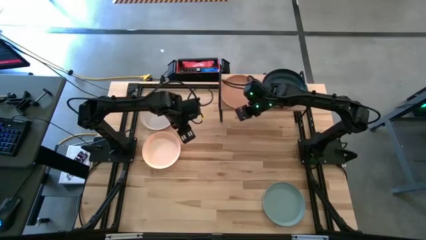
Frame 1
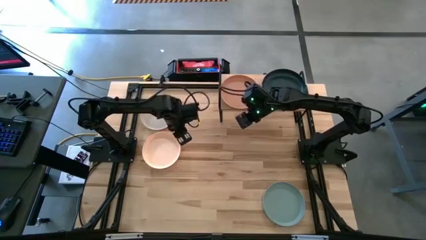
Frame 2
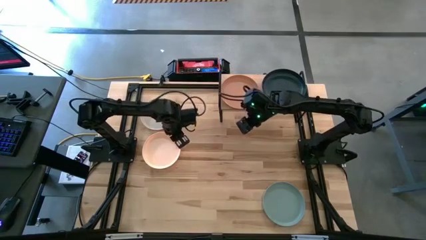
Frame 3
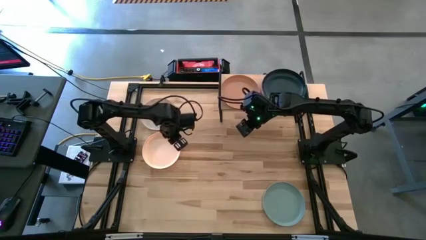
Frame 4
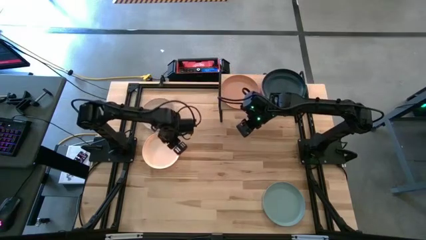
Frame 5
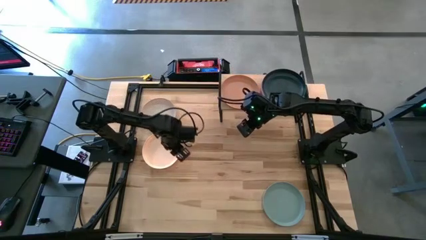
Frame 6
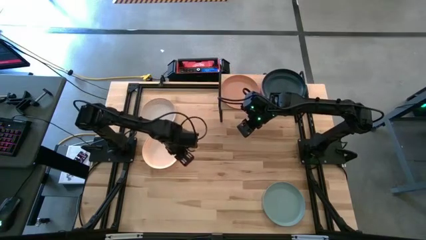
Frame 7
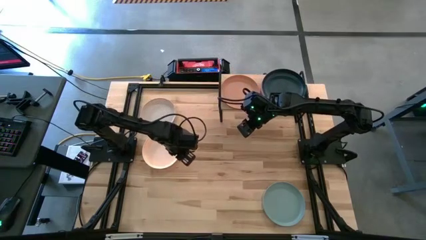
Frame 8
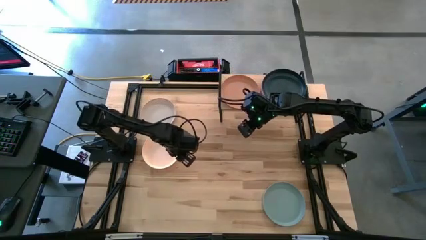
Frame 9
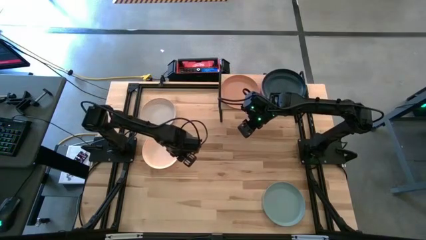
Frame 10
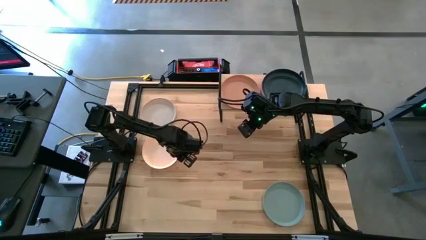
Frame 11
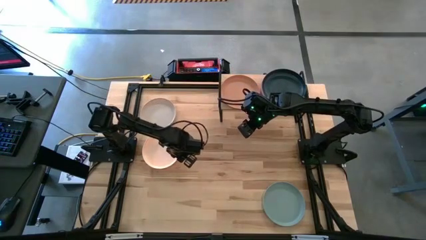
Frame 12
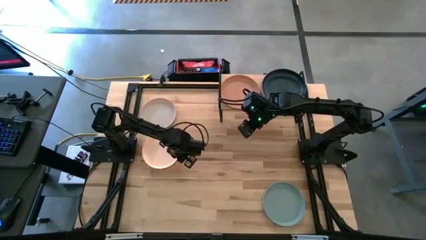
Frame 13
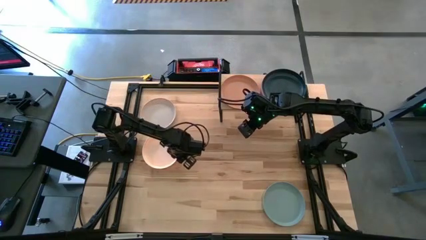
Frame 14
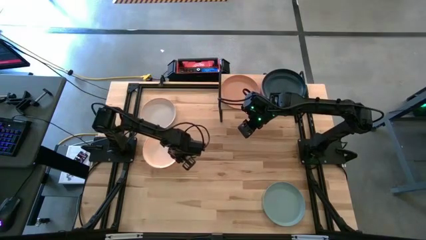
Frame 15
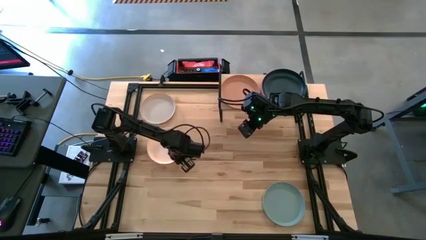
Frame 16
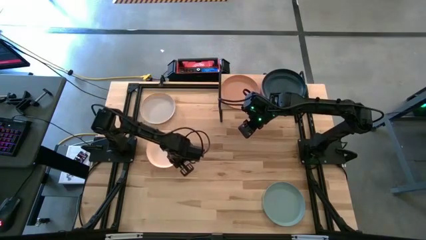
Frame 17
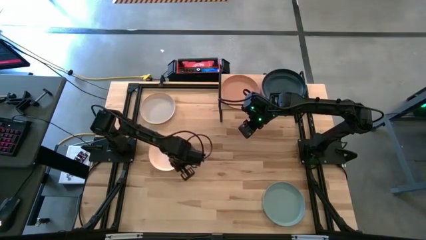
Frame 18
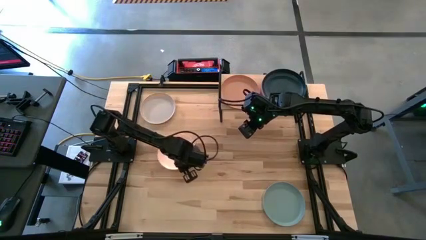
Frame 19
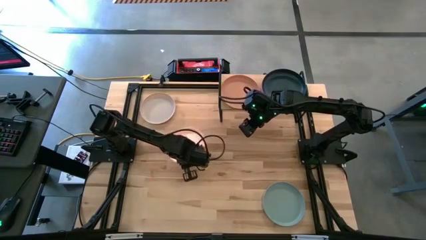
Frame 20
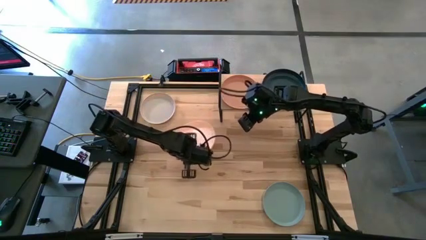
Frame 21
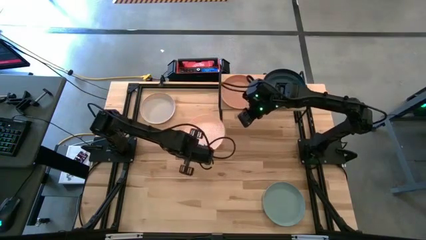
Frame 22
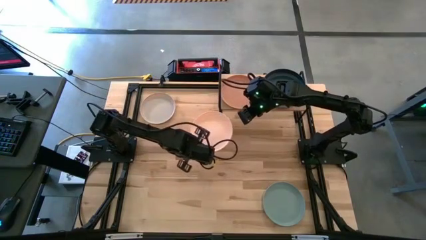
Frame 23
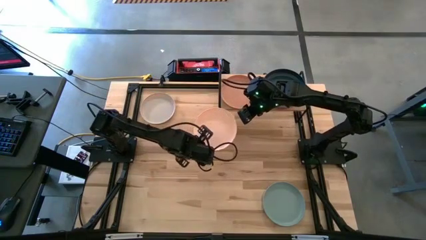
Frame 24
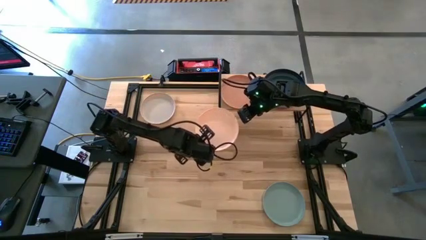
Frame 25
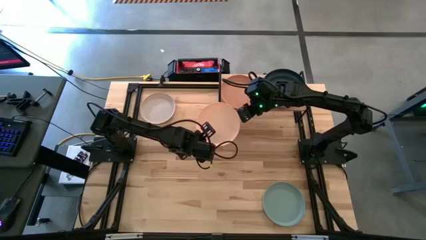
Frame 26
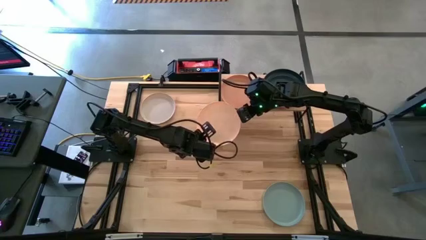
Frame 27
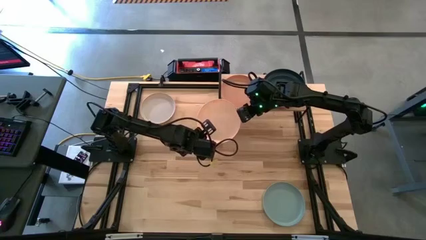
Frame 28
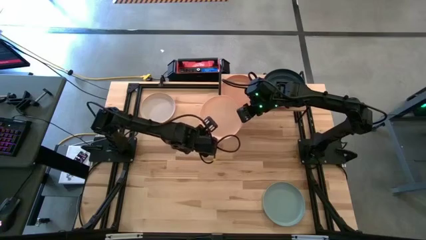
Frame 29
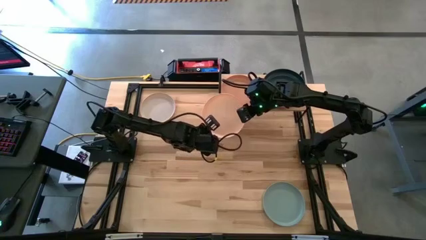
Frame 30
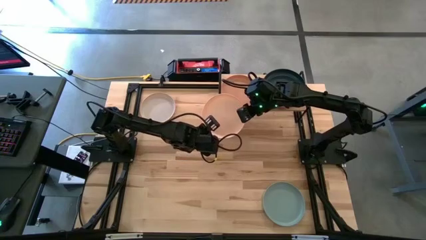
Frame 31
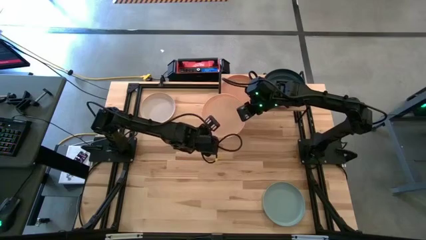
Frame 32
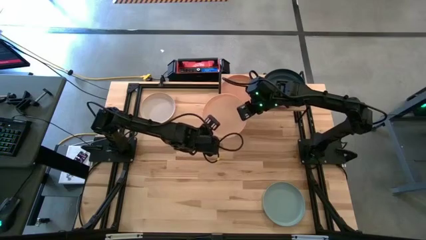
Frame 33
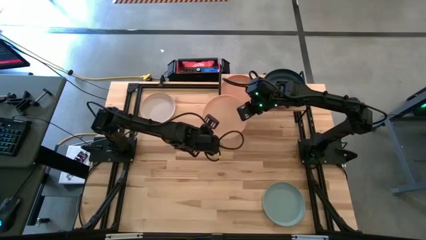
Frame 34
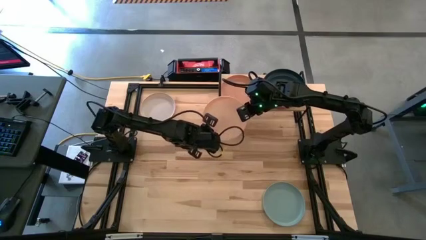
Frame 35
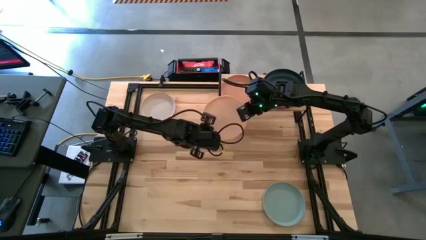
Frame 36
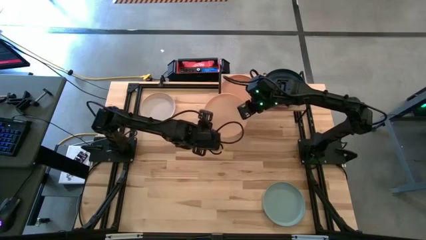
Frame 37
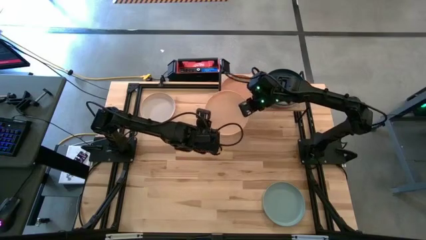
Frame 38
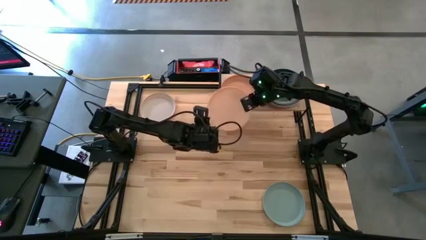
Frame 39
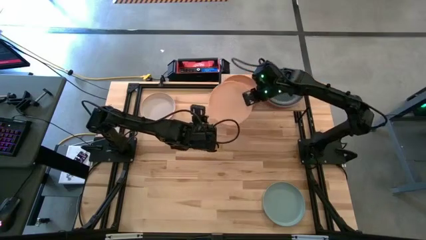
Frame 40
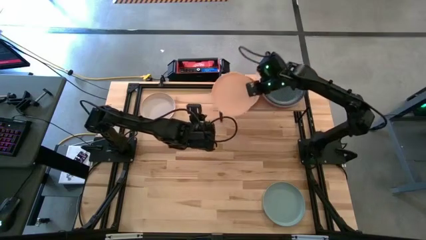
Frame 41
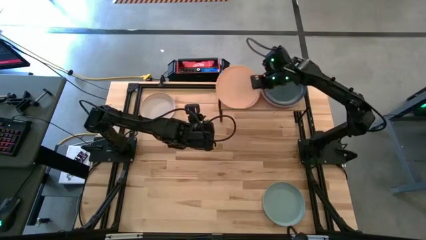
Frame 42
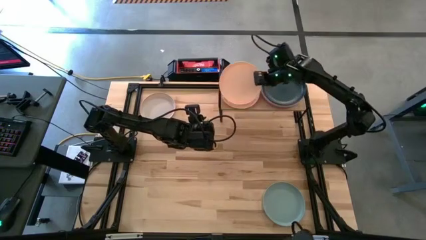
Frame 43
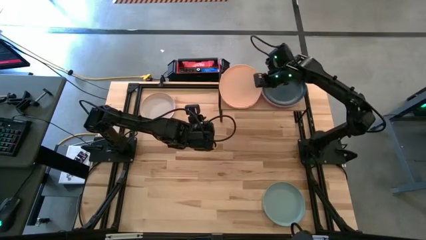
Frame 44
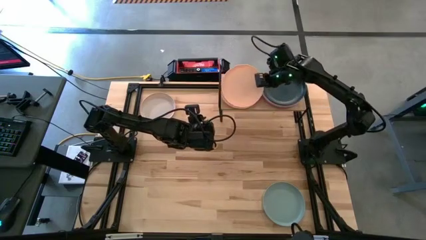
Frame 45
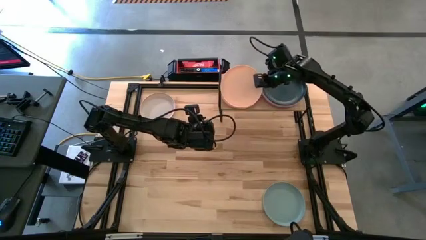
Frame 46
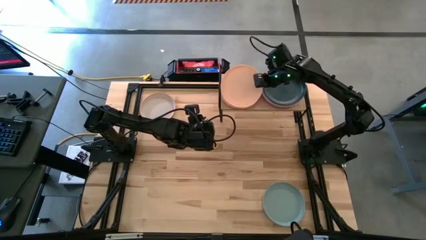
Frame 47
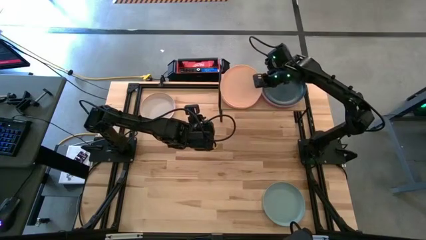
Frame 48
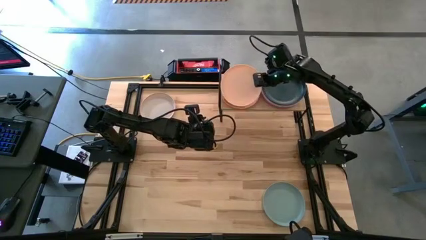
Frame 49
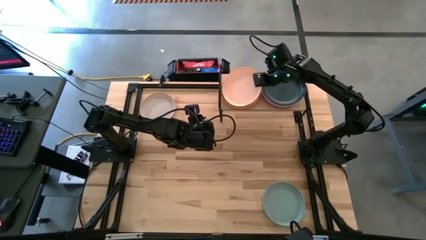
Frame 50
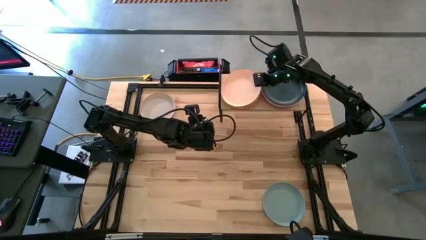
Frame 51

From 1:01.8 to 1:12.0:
Task: Place and stack plates onto a shelf
Stack the light orange plate on top of the brown plate on the shelf

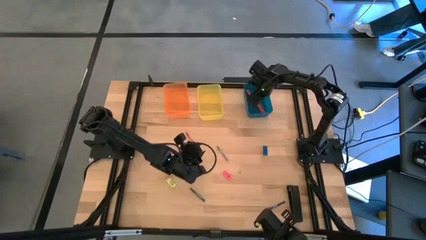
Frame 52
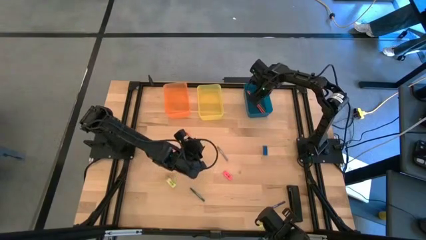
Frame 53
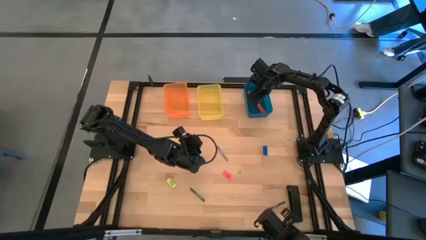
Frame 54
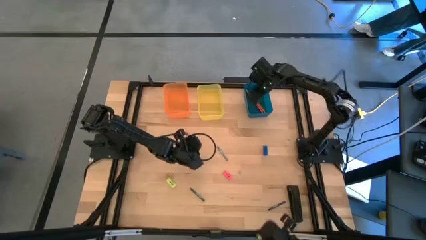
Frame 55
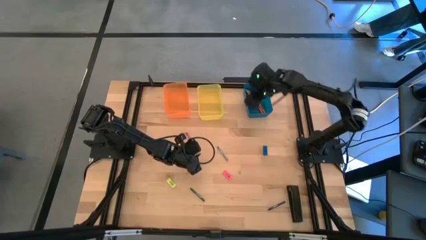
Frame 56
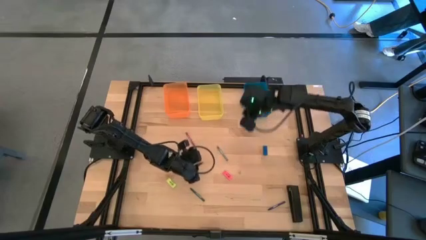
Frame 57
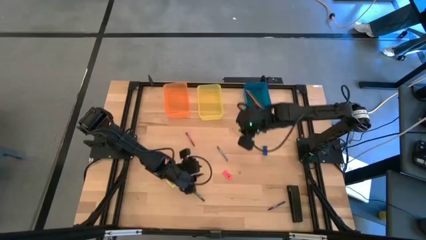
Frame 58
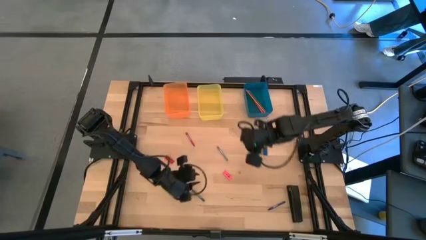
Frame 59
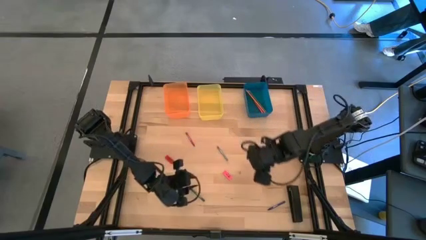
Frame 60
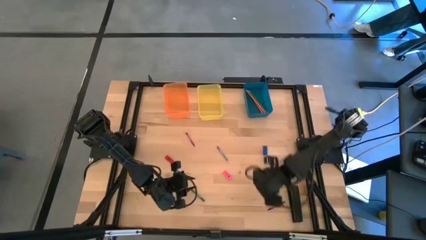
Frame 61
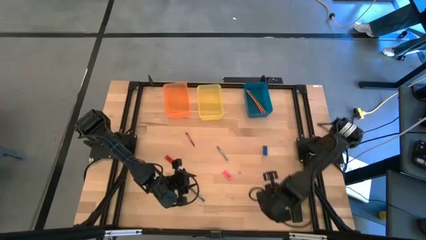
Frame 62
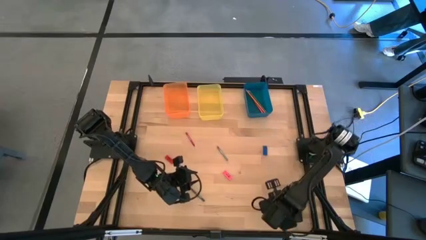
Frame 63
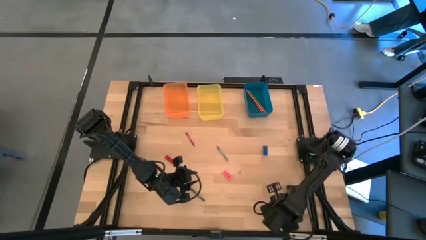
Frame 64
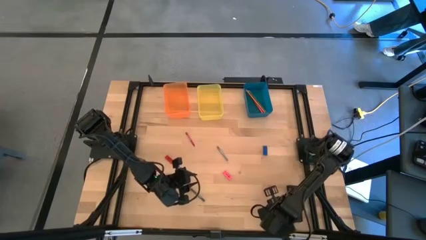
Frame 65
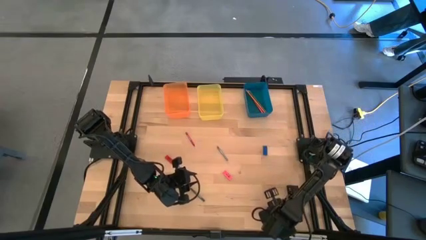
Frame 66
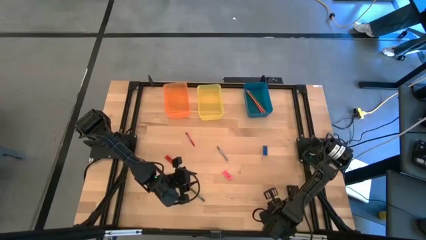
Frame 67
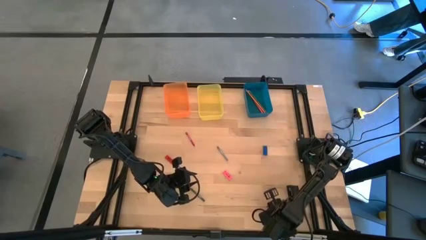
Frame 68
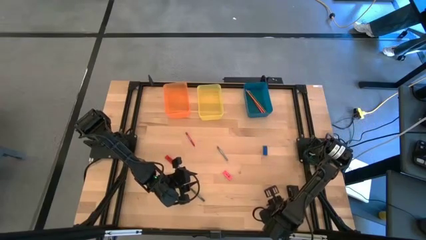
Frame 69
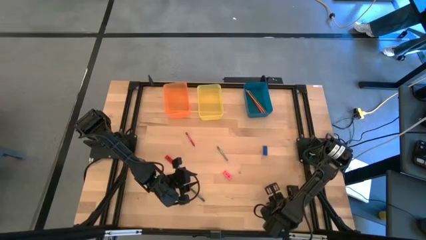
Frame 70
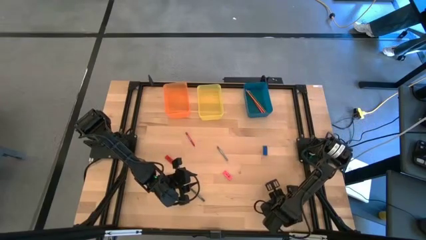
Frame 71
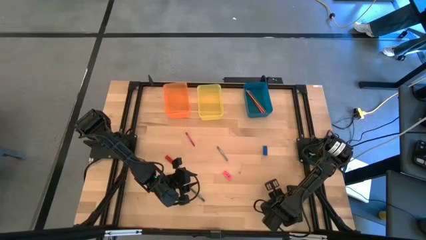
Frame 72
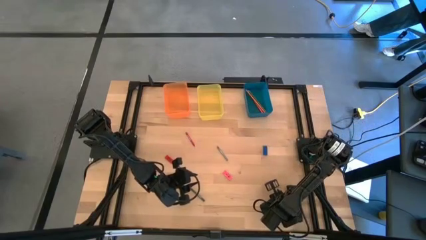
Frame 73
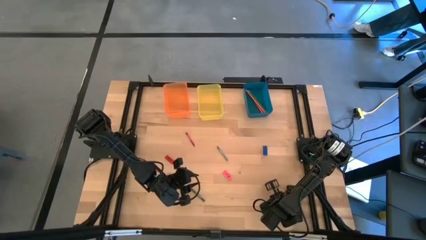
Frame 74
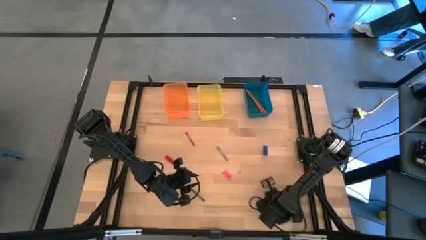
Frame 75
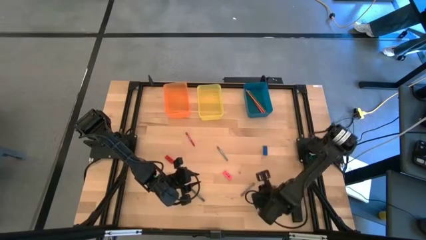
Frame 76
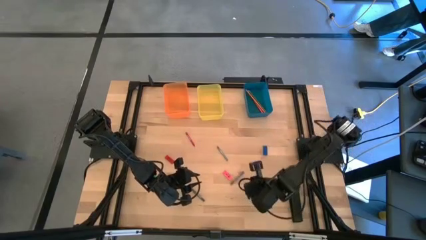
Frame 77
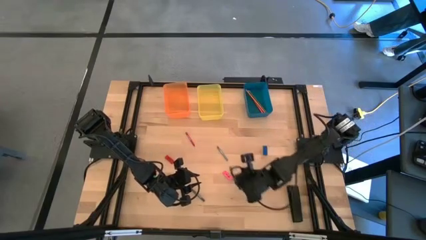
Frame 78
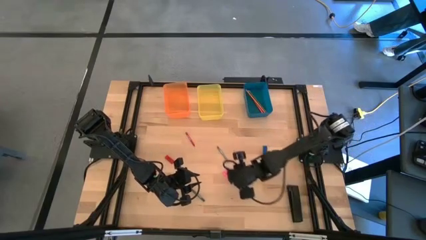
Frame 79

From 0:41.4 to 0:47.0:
Task: Sort crayons/erasers/pens/pencils in bins
Put the blue crayon into the yellow bin

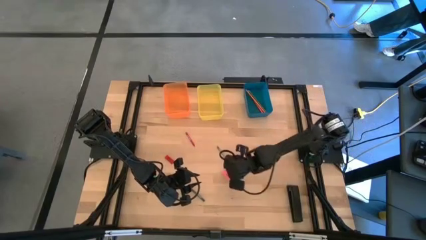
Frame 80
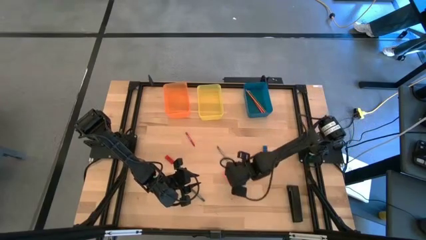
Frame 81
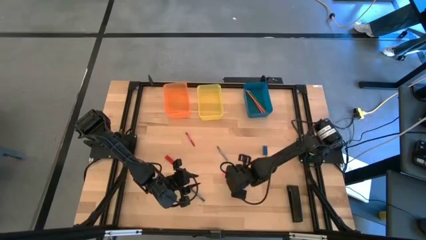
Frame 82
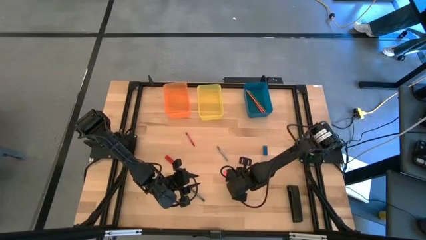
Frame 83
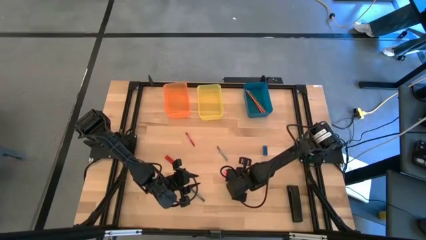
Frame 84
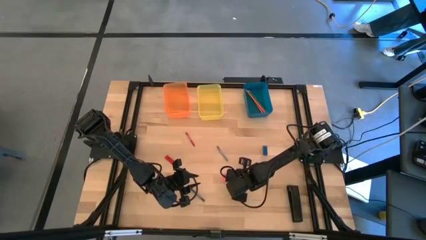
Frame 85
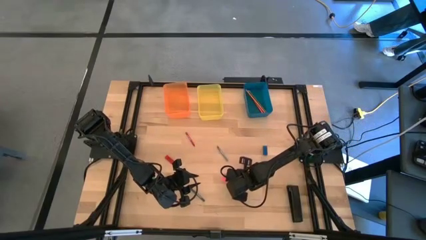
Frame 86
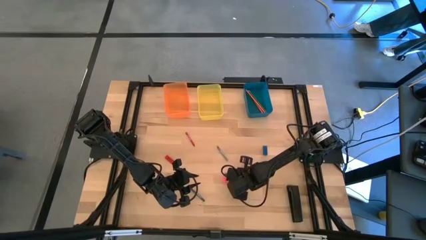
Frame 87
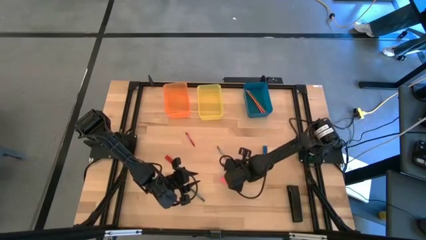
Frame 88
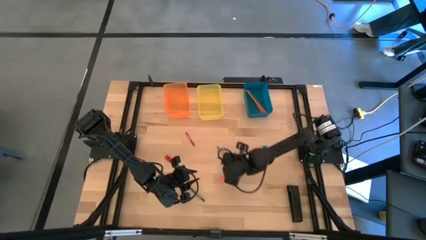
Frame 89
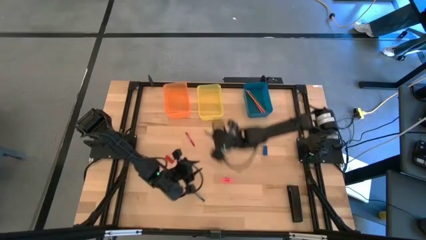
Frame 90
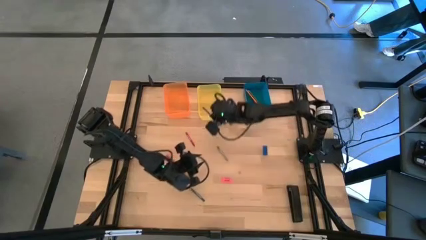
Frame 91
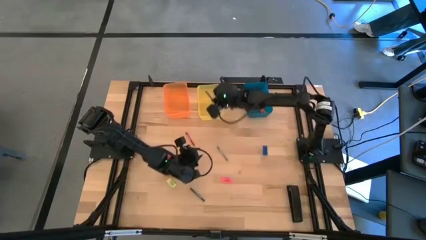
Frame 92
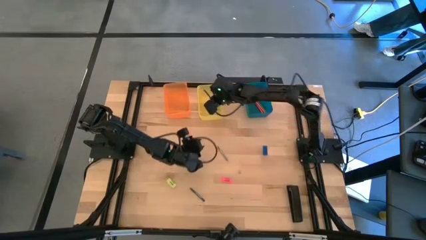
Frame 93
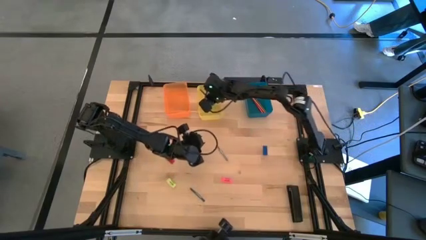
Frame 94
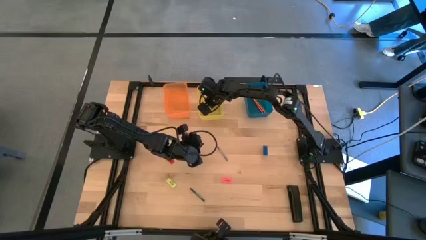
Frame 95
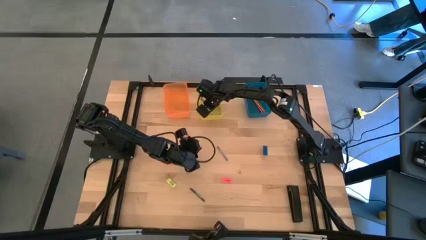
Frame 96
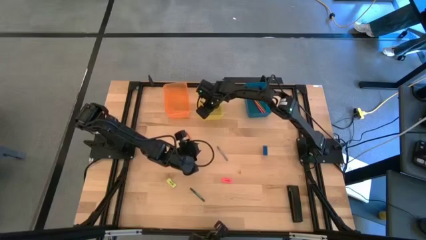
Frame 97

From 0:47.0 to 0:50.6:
Put the blue crayon into the yellow bin
